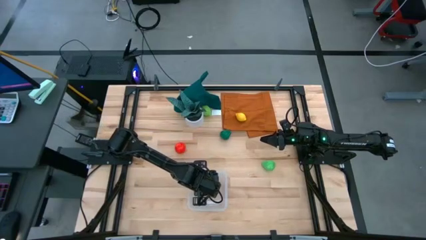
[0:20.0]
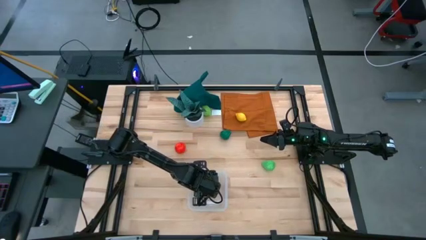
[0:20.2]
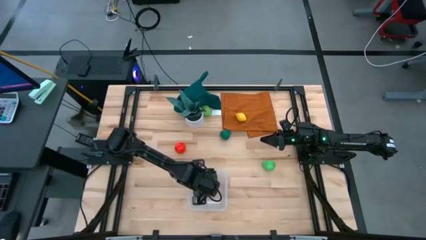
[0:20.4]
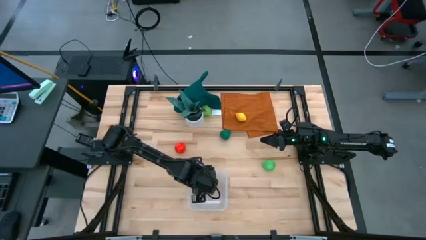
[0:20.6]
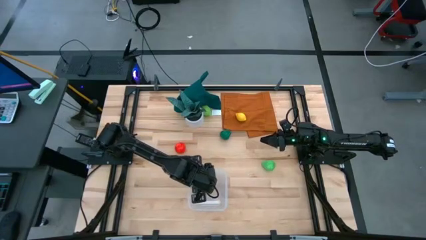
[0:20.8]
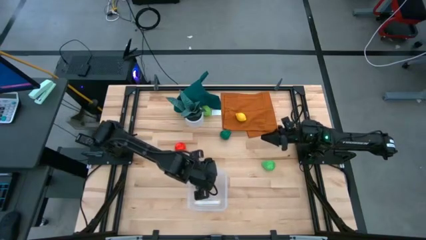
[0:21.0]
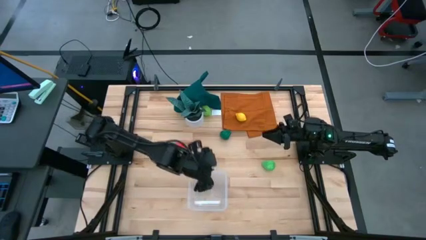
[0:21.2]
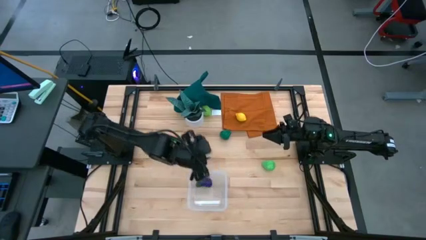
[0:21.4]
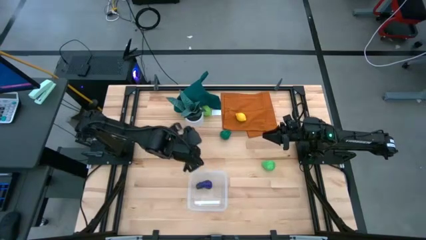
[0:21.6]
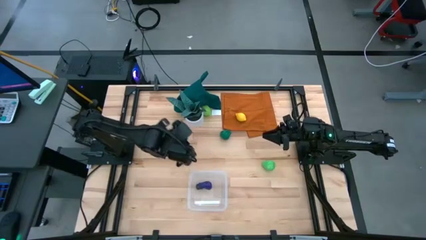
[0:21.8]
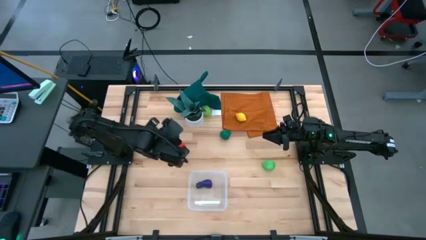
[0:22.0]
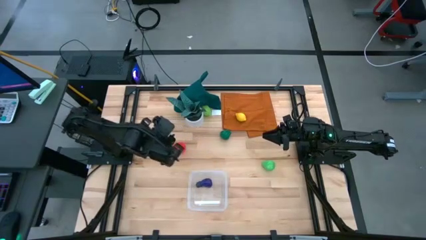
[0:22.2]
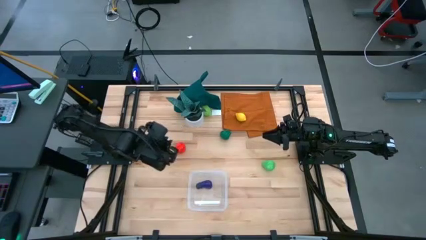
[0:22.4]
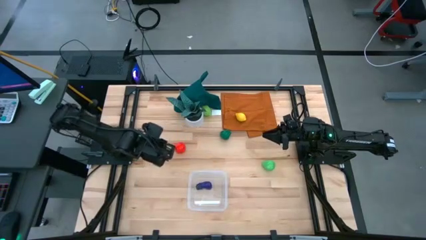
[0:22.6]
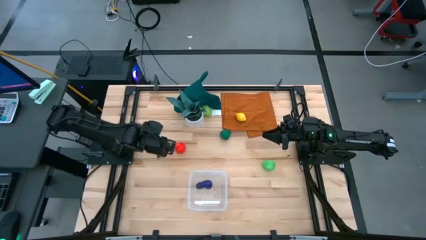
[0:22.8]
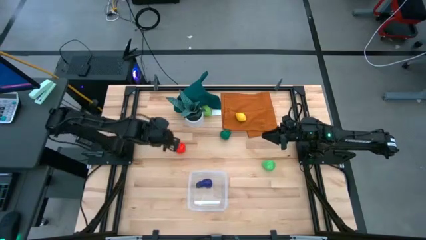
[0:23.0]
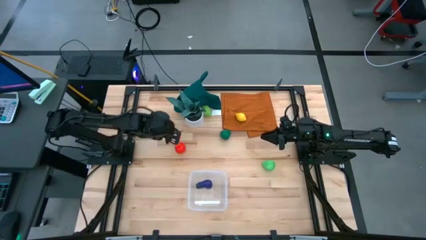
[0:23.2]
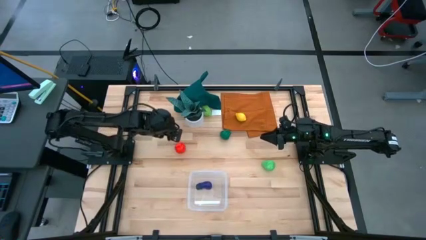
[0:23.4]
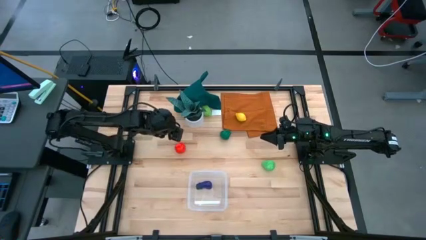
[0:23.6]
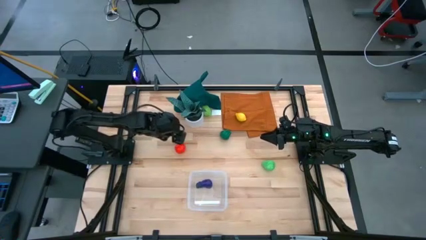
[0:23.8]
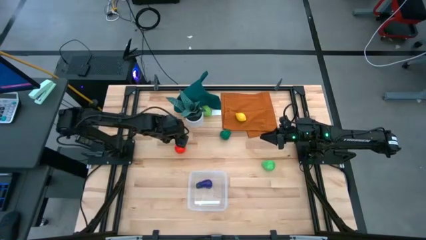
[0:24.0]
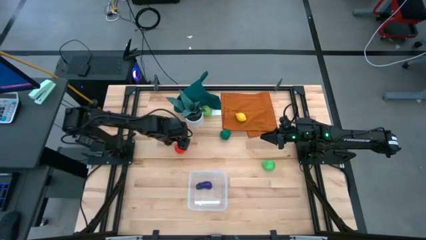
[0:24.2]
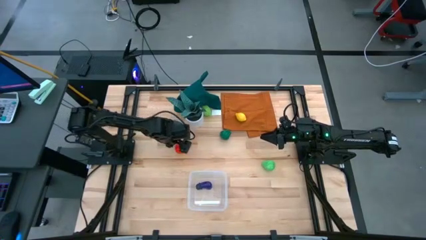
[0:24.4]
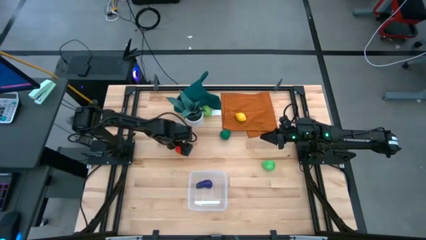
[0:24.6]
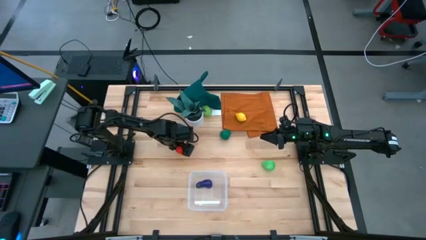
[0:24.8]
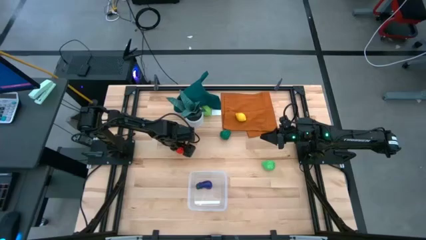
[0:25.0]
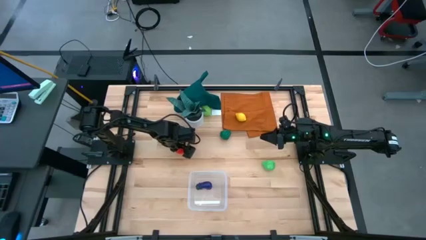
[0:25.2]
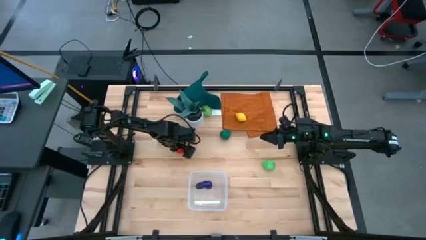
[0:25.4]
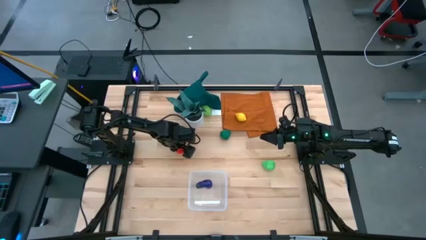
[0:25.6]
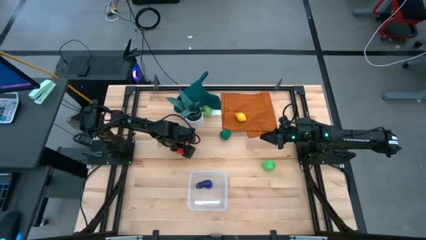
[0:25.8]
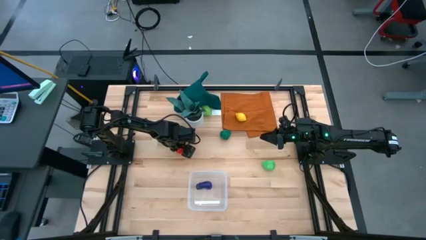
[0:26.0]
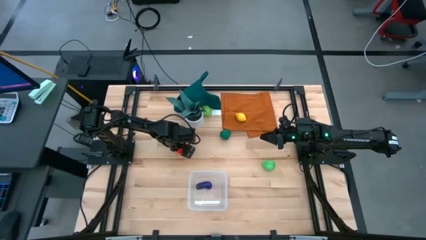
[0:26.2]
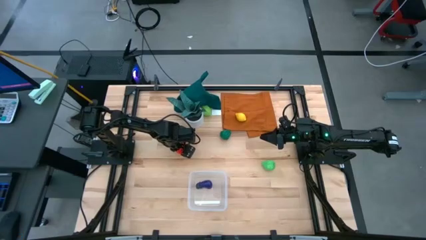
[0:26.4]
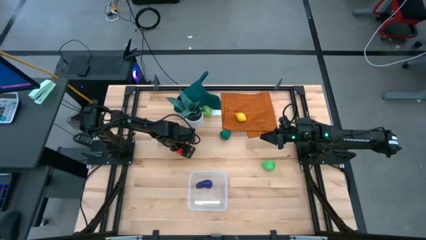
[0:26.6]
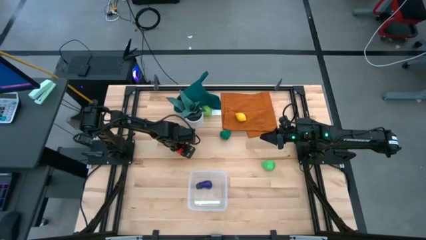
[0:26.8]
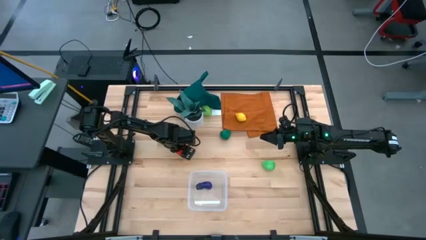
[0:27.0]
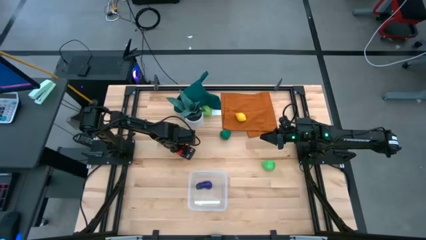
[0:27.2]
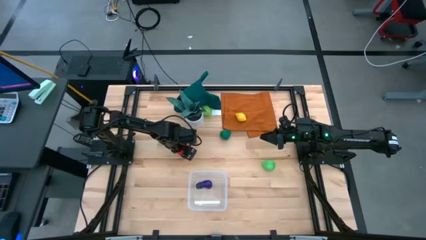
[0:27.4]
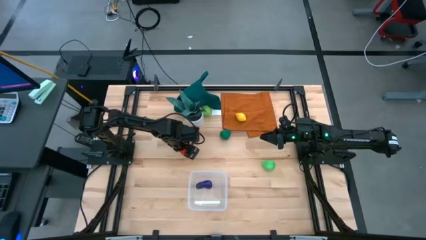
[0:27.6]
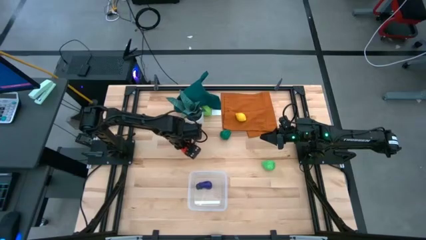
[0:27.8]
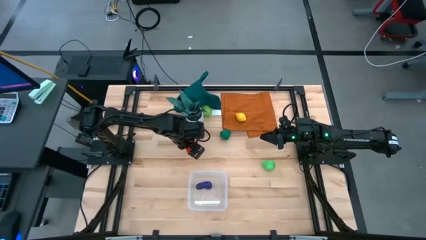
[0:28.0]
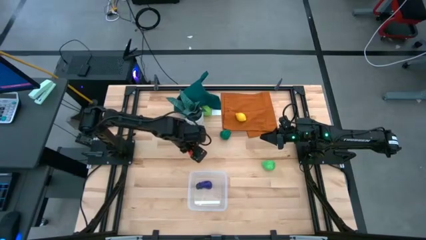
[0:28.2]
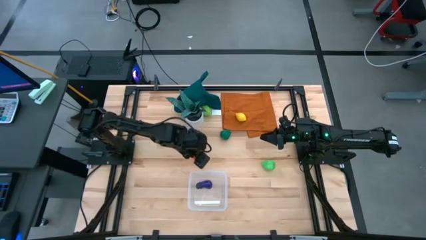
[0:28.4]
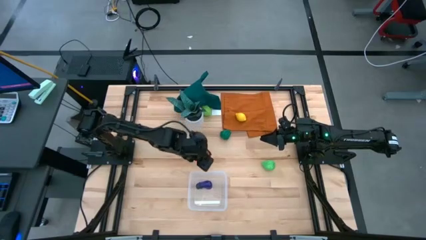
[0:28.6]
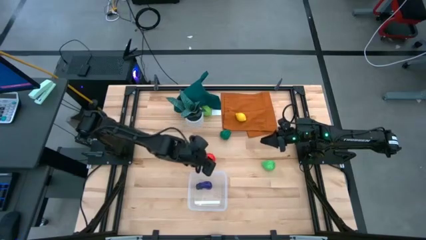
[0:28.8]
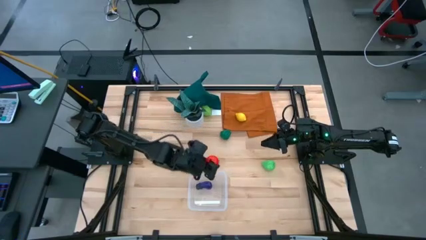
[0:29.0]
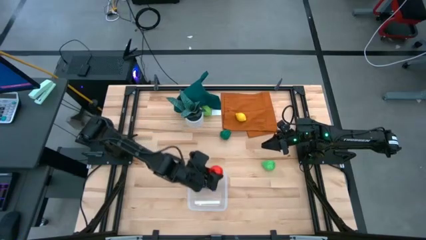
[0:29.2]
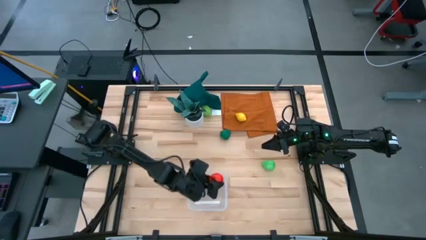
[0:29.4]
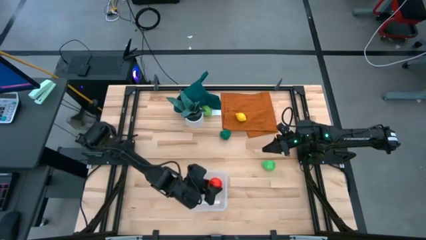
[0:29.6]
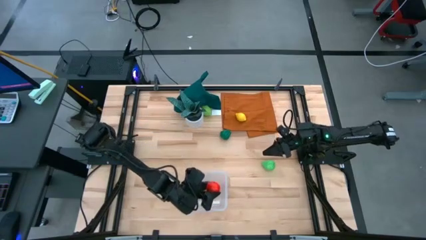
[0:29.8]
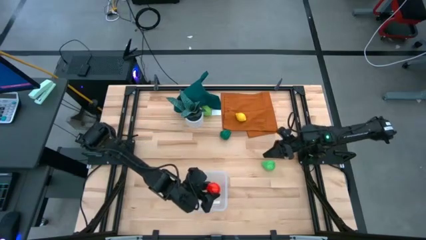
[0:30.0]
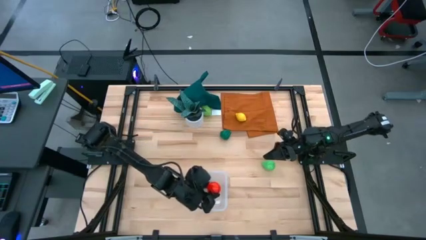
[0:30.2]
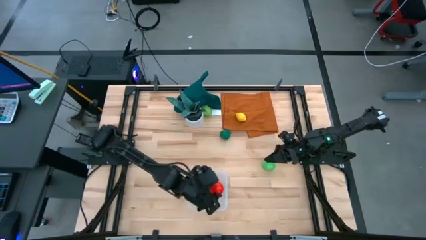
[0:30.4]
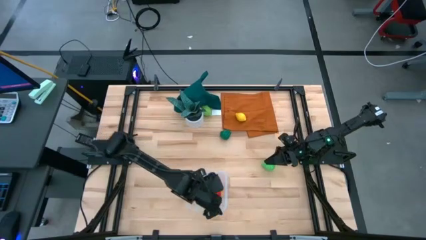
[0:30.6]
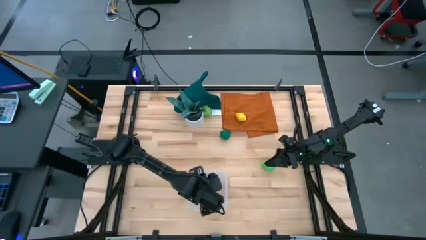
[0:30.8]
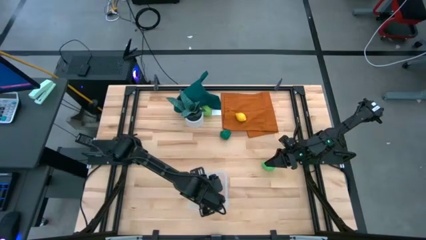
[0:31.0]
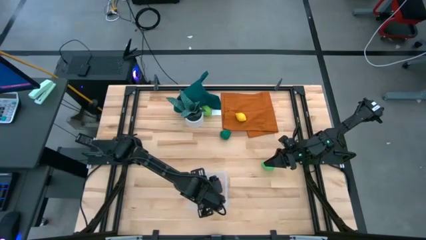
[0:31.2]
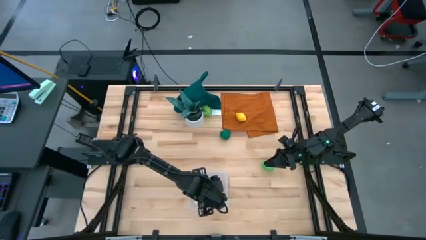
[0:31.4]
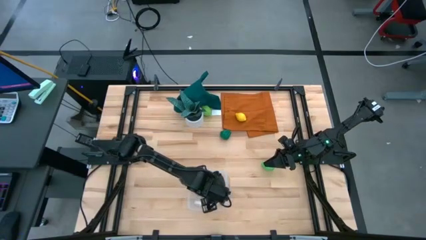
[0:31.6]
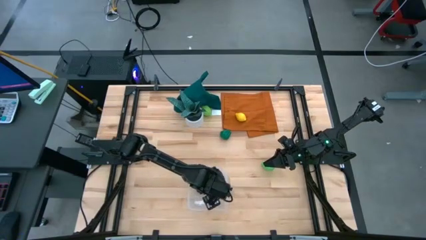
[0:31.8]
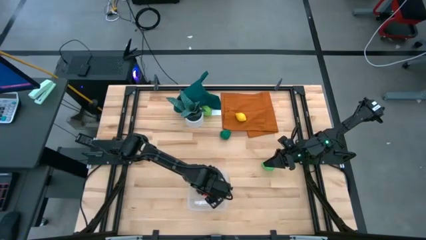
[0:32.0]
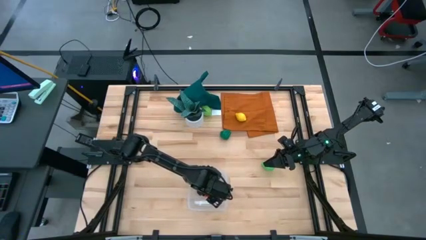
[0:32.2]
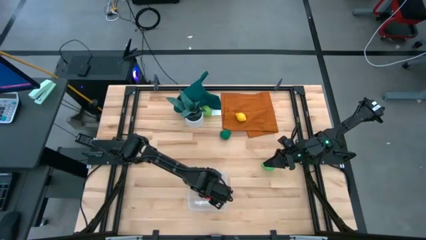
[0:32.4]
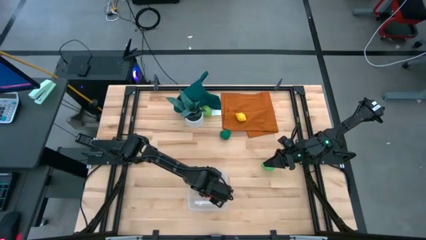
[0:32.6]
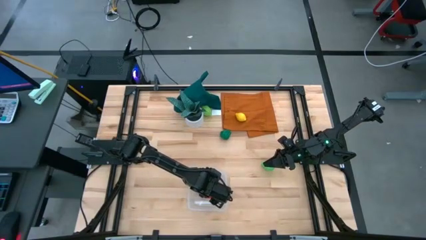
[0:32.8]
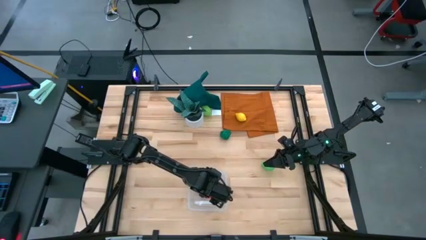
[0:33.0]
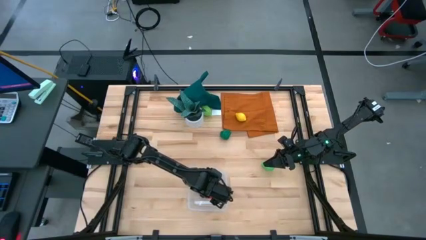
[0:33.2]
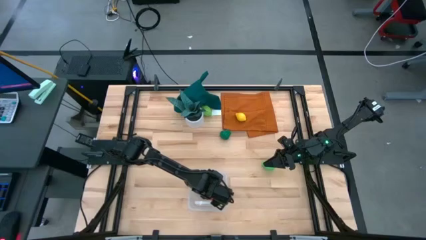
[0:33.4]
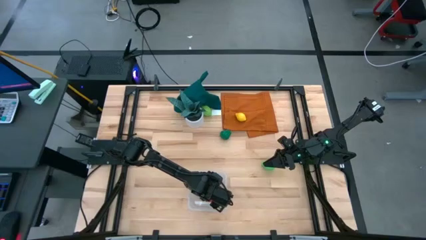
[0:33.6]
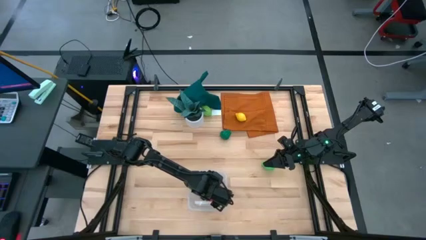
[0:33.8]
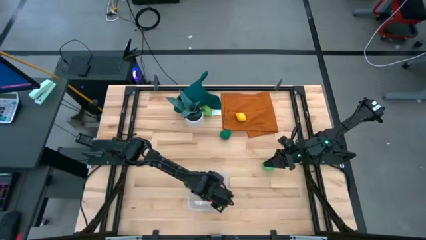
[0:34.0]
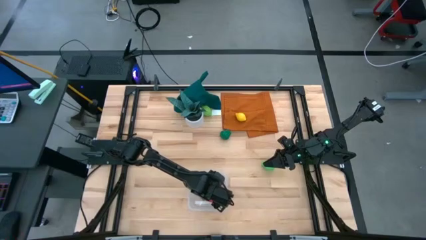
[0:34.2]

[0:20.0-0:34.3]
Task: Pick and placing Produce into tupperware
Put the tomato into the transparent bin
